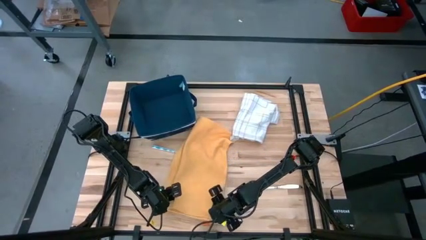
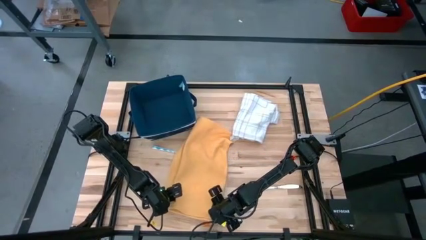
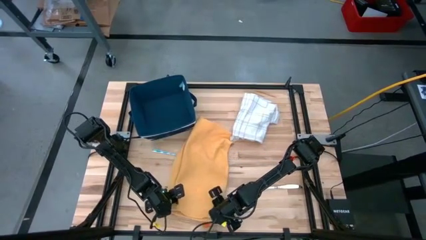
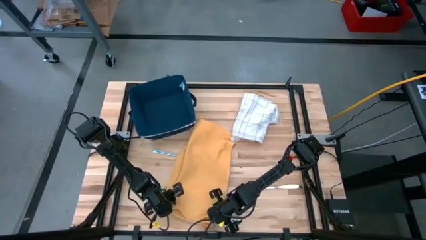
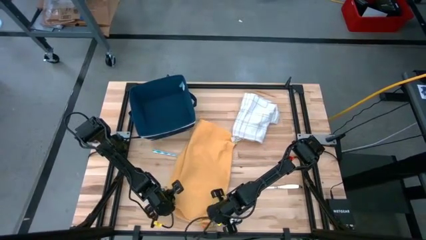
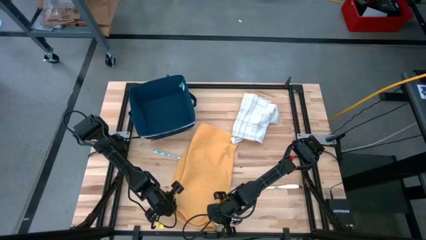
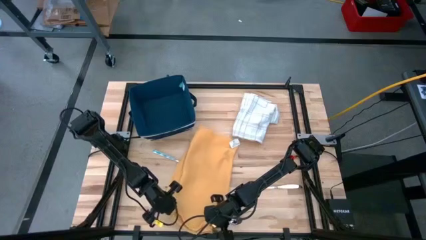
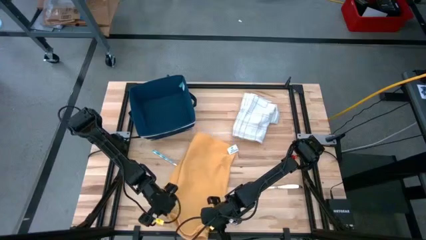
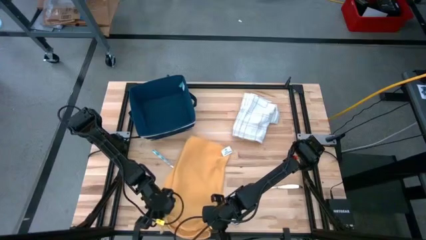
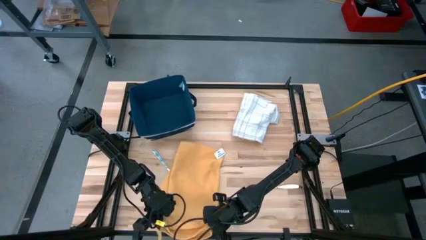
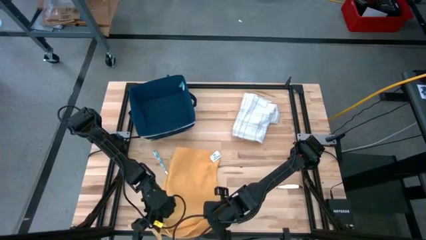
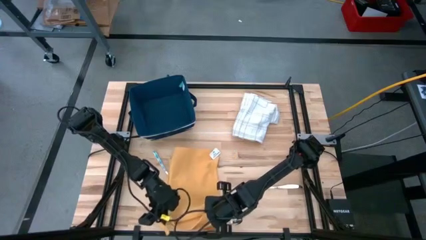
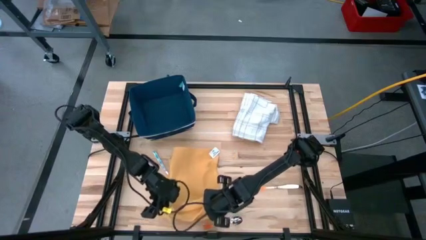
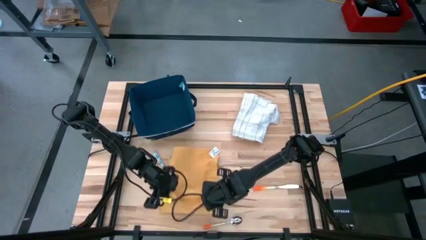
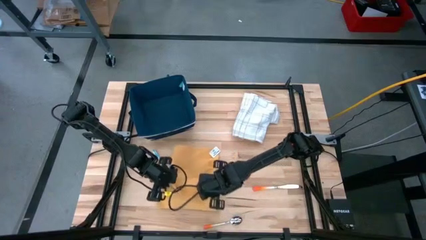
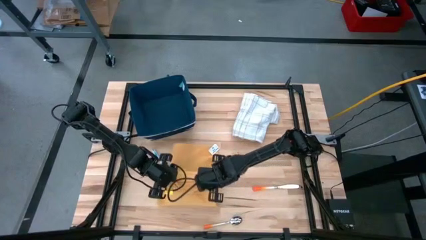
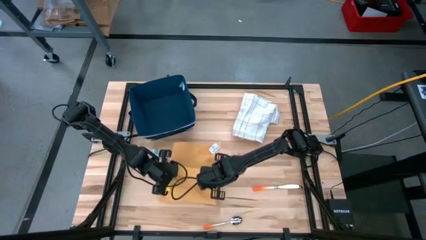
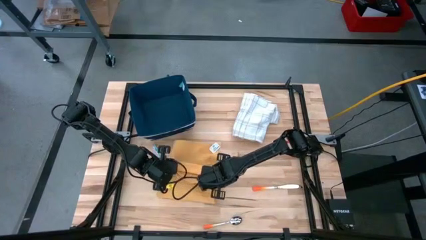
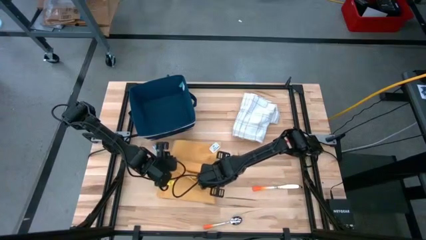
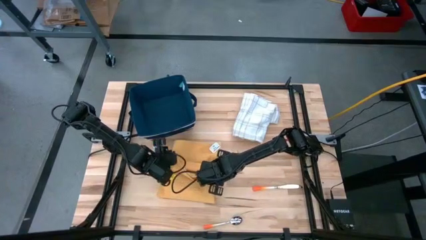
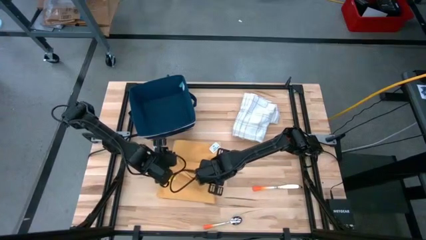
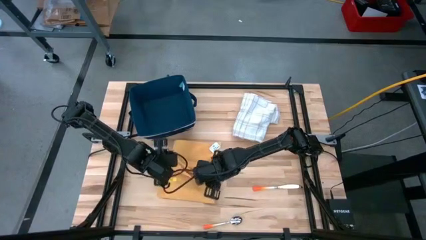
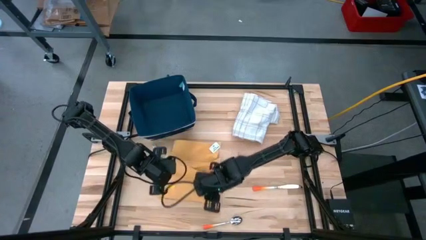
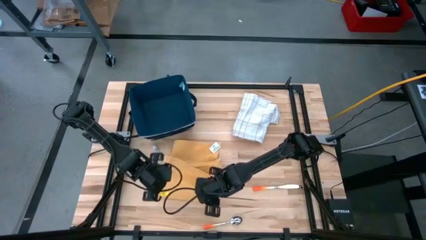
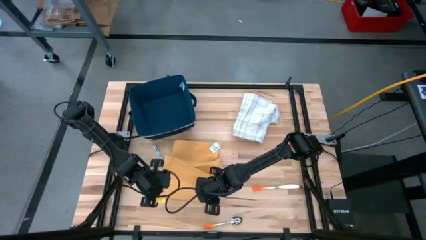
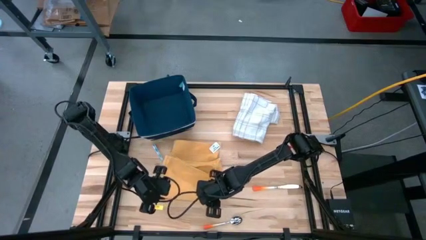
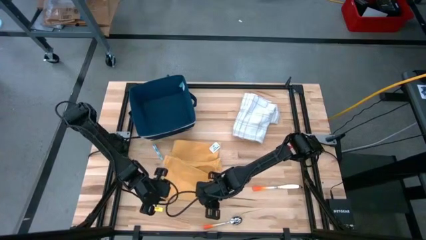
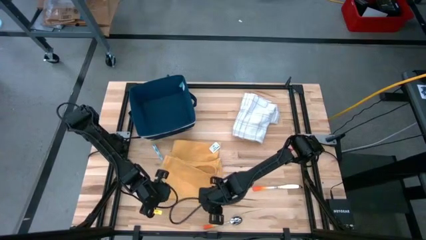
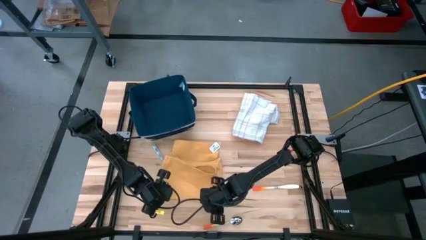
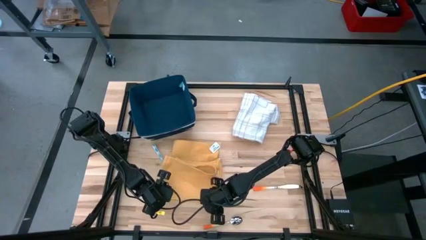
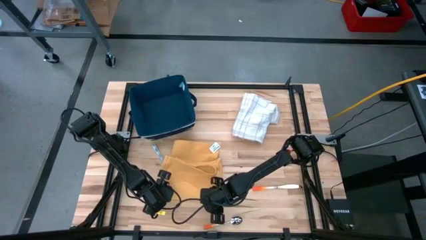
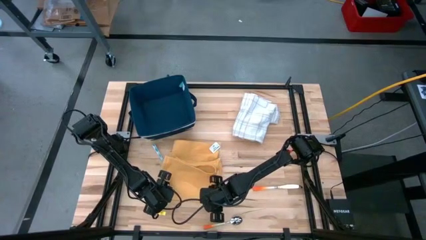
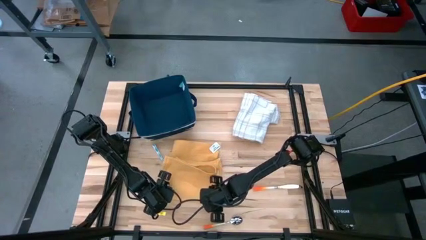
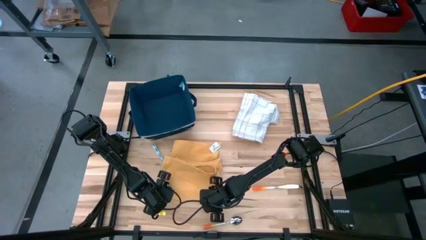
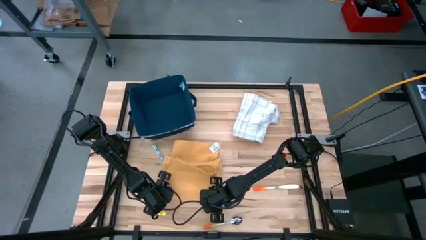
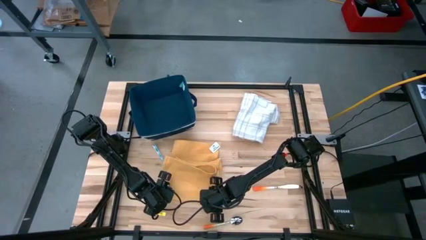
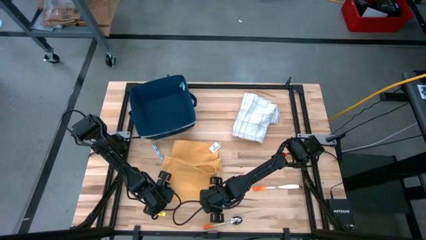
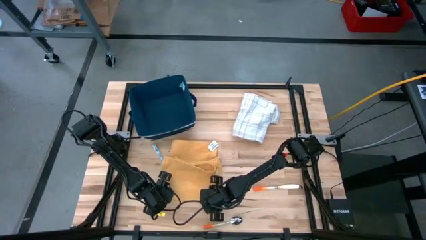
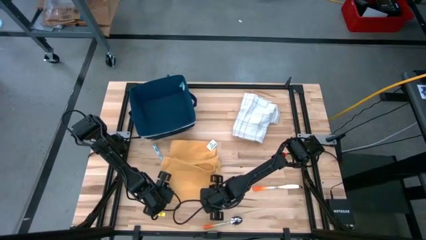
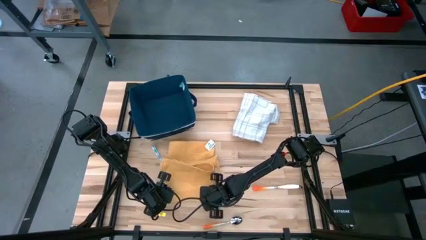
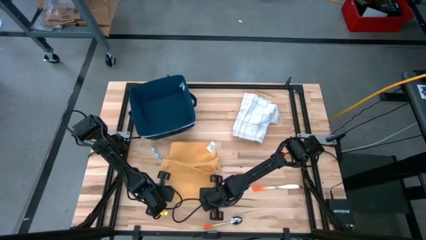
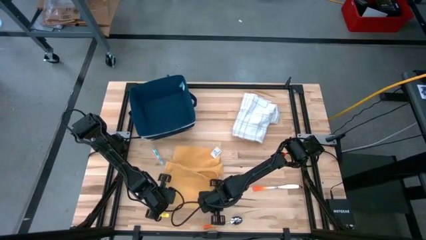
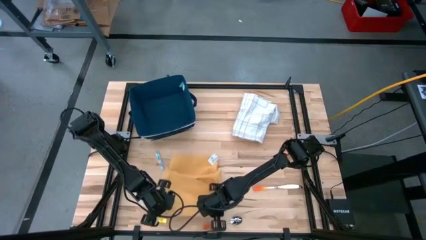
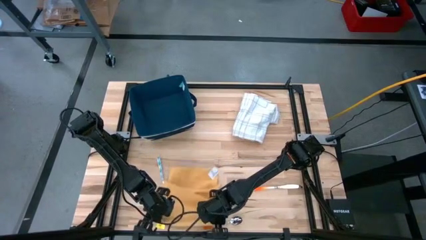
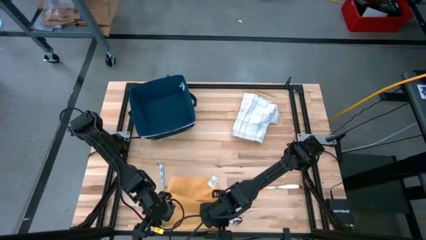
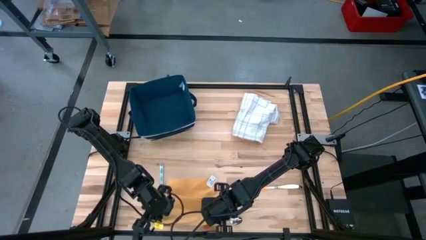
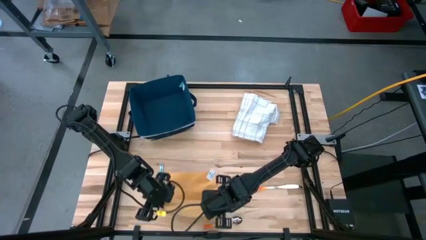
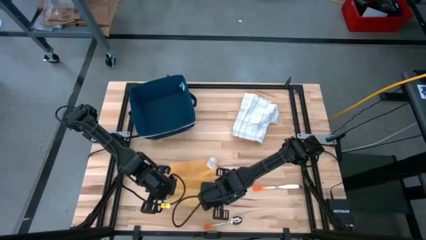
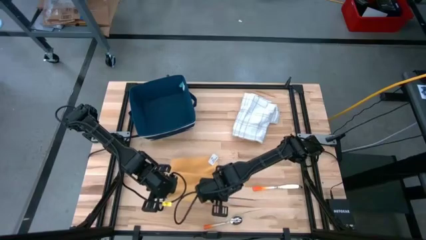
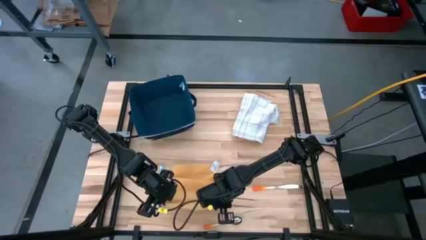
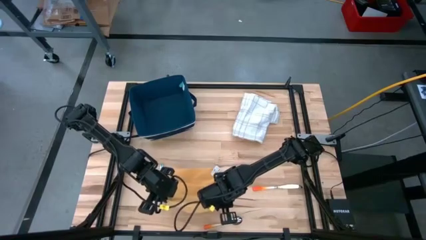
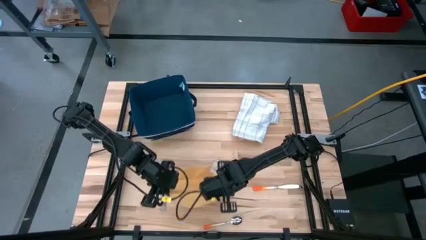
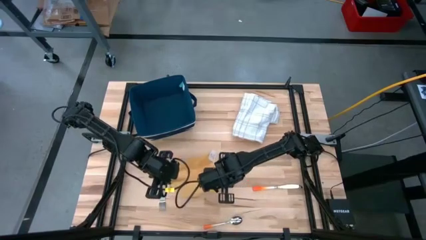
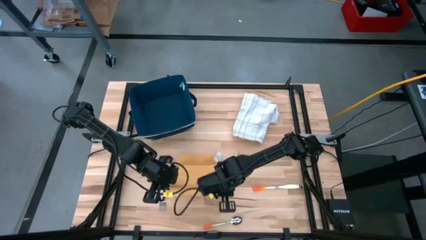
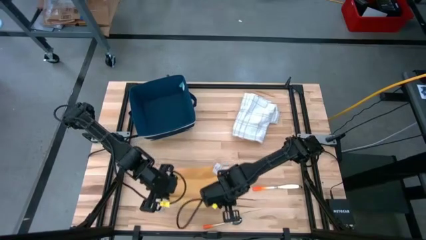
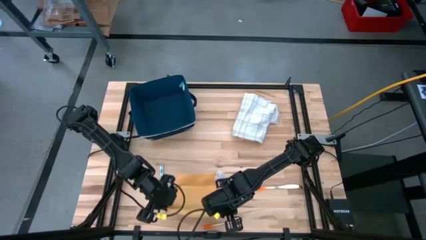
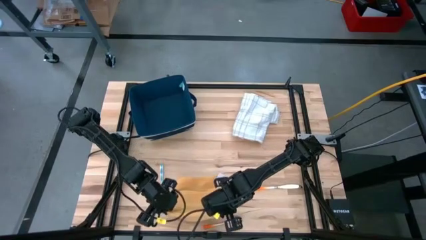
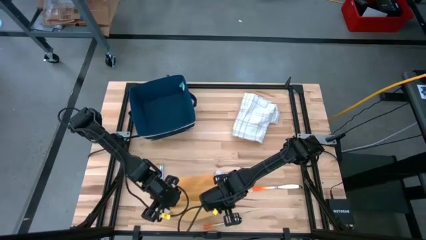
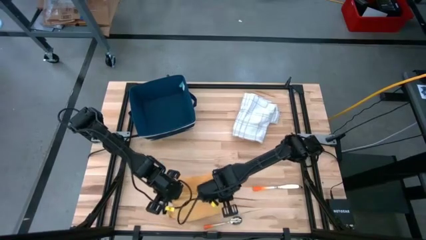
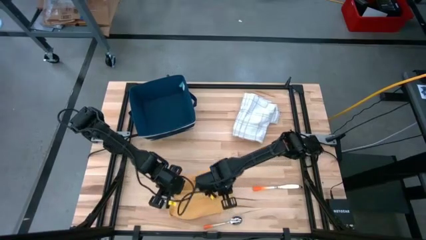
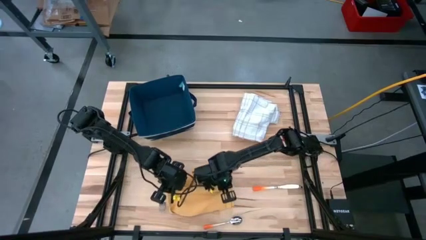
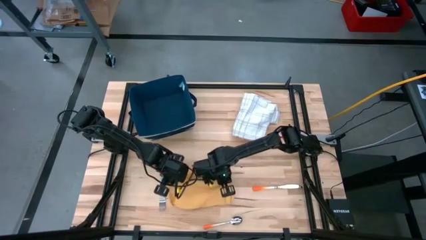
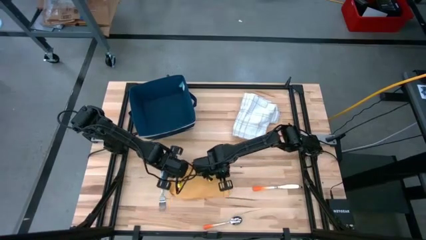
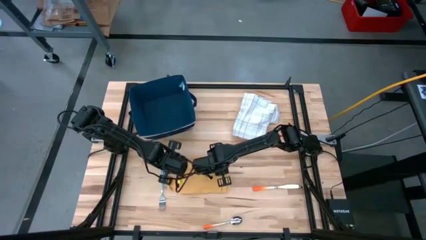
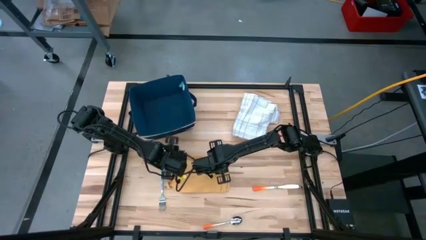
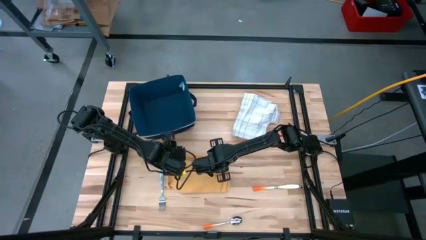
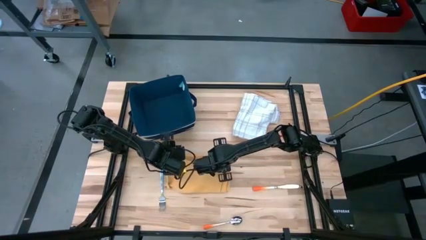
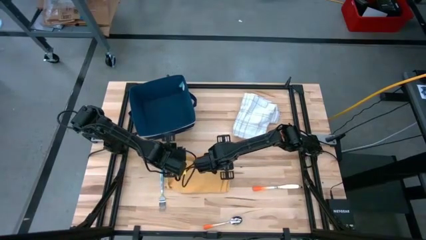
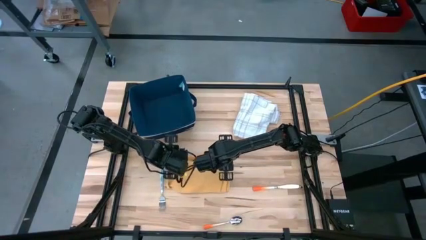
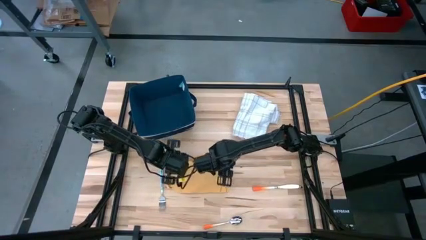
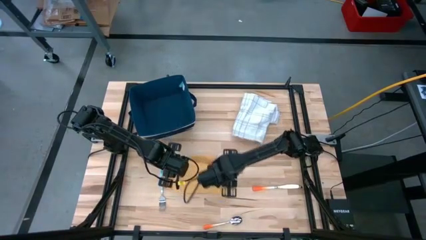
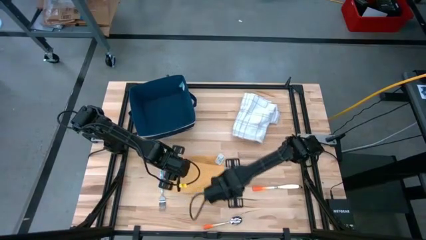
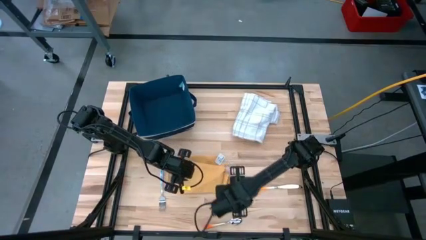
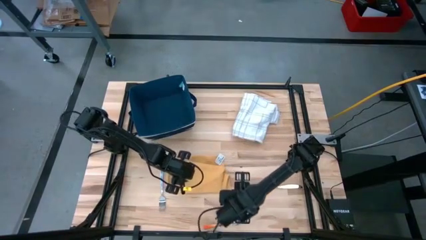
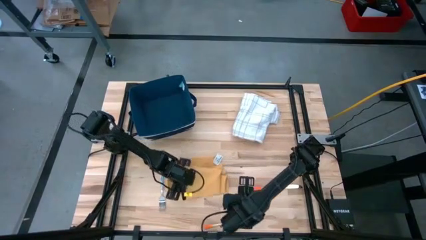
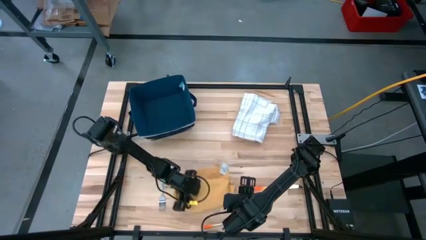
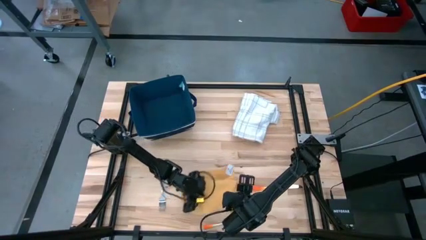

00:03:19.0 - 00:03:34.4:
Task: Fold towel
Fold the yellow towel
